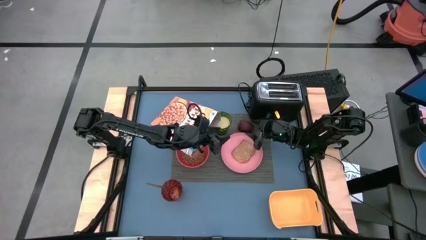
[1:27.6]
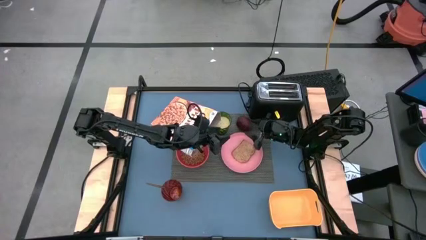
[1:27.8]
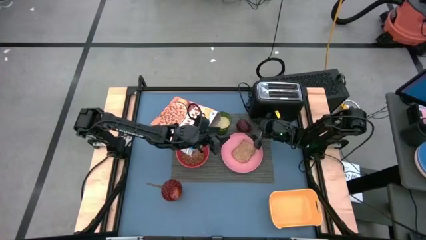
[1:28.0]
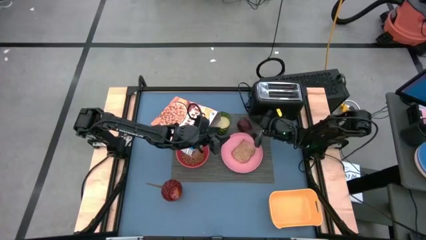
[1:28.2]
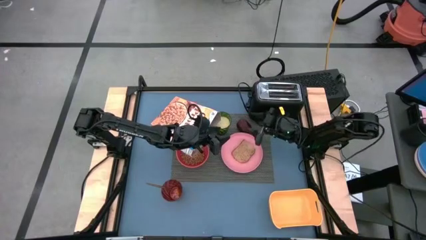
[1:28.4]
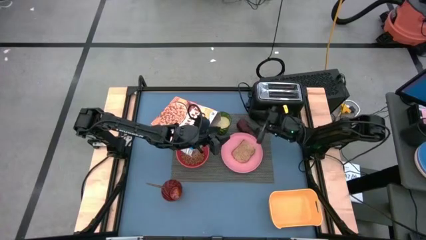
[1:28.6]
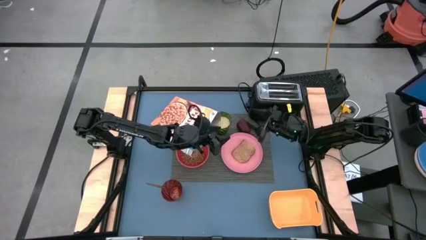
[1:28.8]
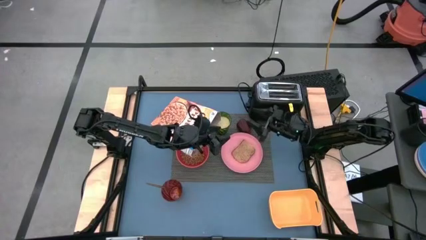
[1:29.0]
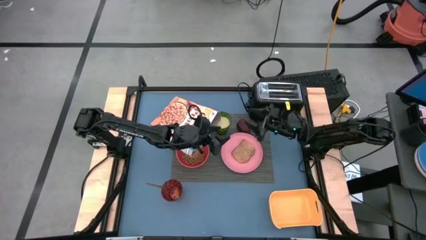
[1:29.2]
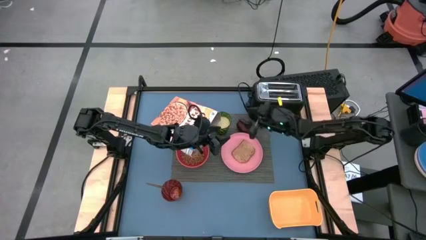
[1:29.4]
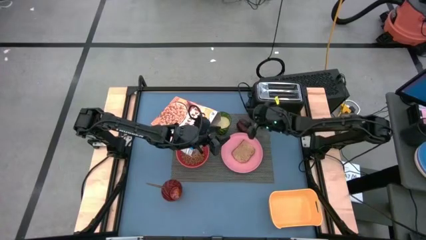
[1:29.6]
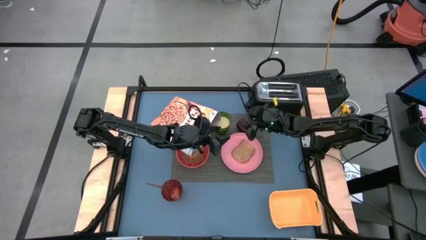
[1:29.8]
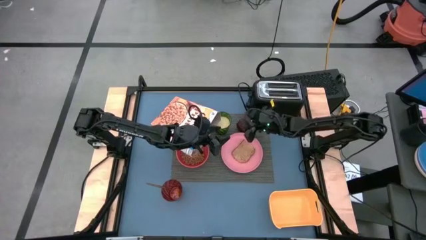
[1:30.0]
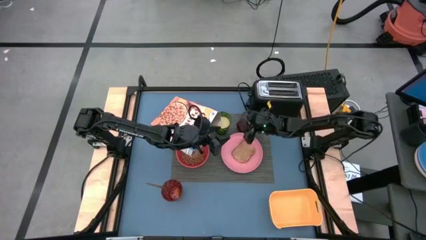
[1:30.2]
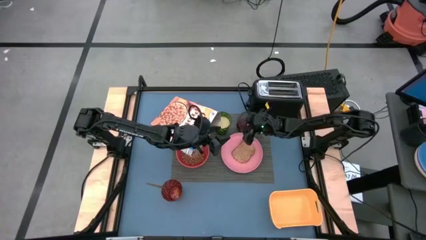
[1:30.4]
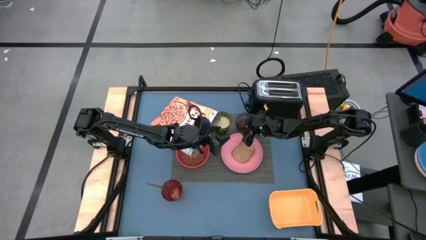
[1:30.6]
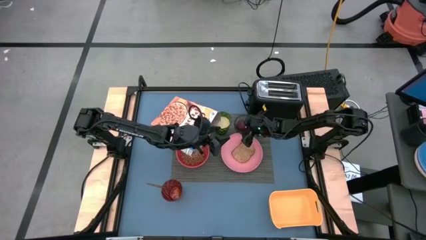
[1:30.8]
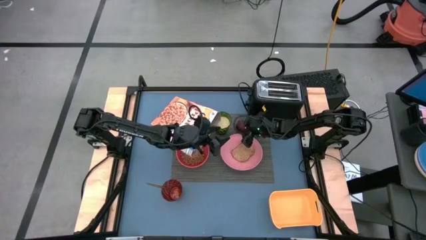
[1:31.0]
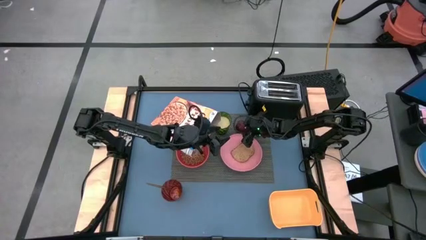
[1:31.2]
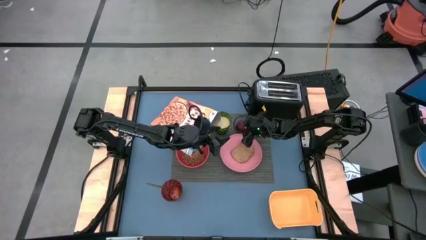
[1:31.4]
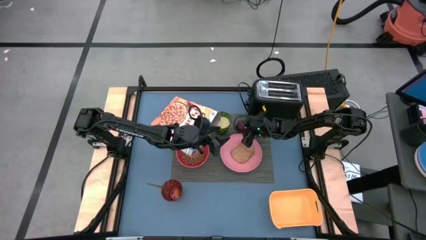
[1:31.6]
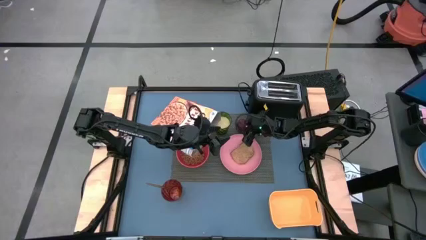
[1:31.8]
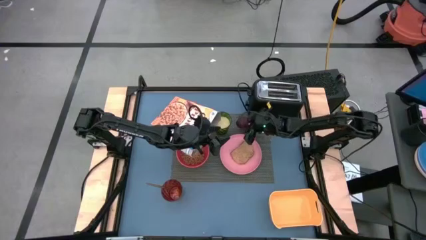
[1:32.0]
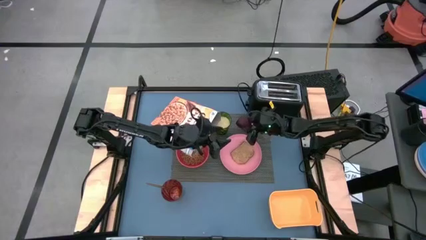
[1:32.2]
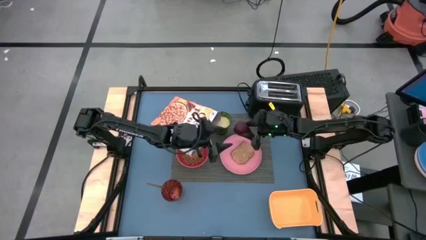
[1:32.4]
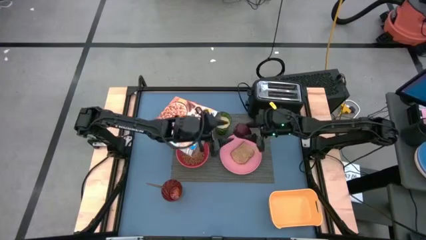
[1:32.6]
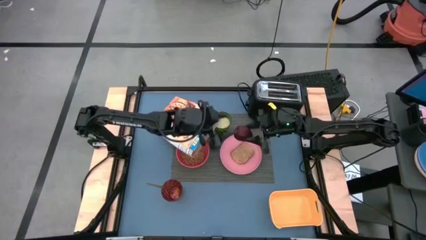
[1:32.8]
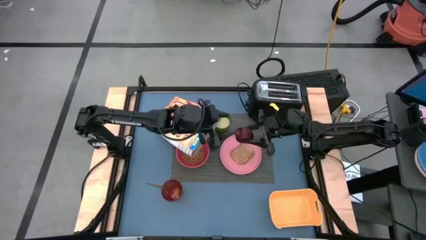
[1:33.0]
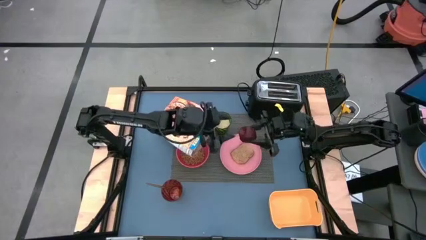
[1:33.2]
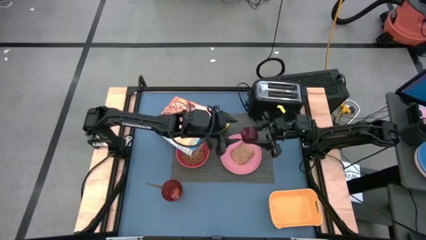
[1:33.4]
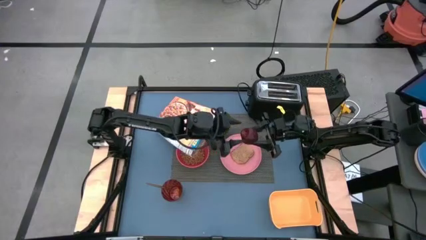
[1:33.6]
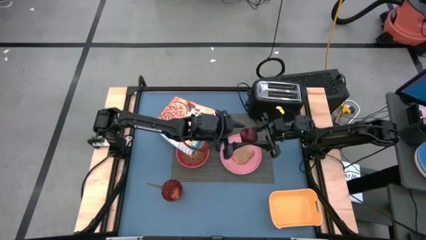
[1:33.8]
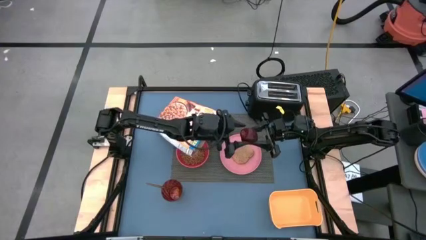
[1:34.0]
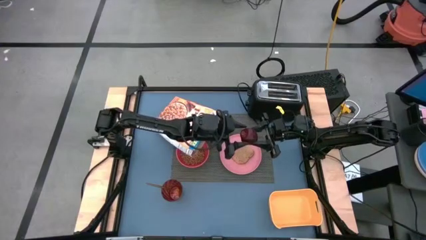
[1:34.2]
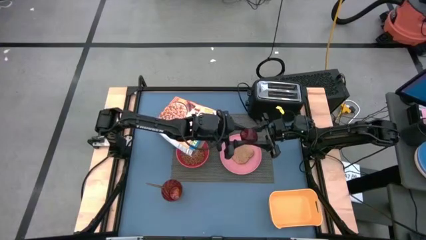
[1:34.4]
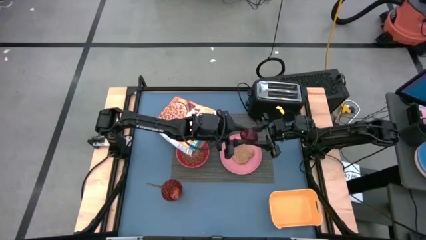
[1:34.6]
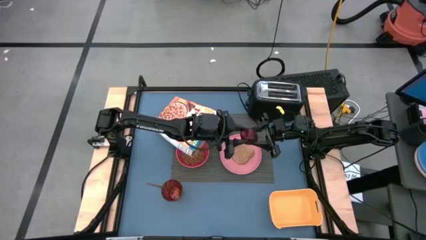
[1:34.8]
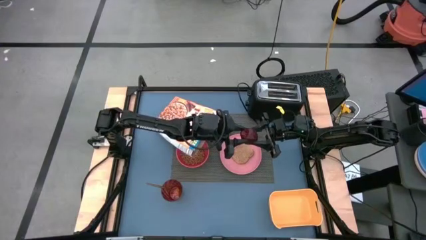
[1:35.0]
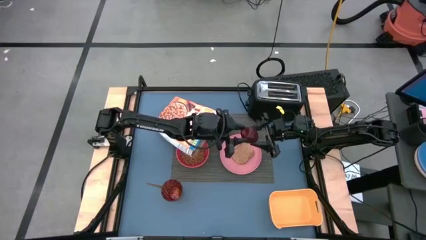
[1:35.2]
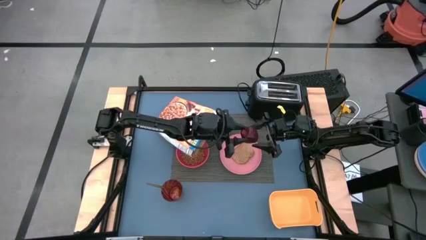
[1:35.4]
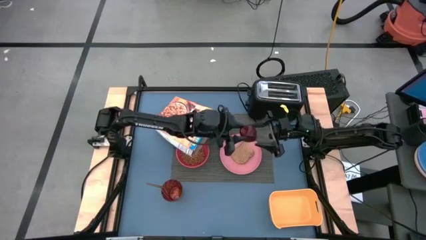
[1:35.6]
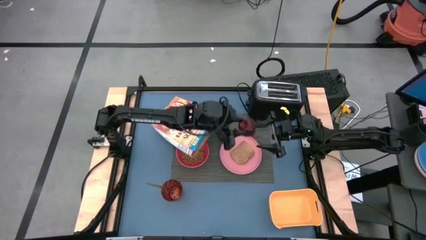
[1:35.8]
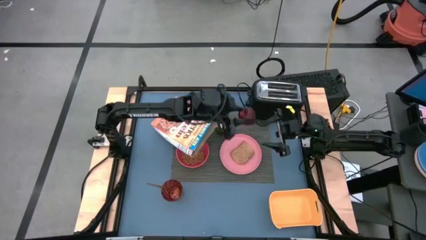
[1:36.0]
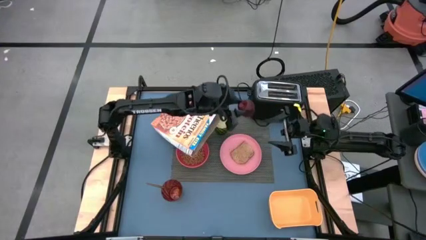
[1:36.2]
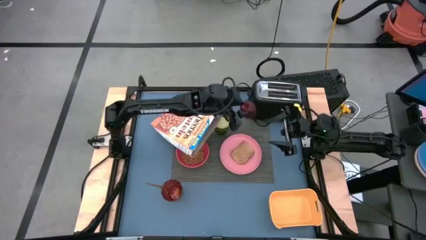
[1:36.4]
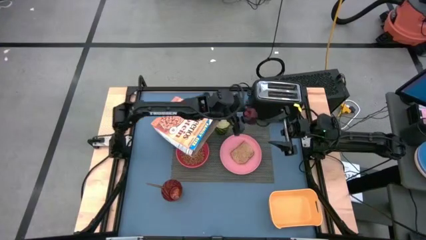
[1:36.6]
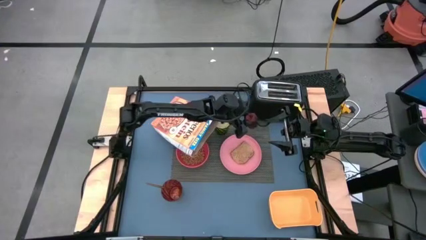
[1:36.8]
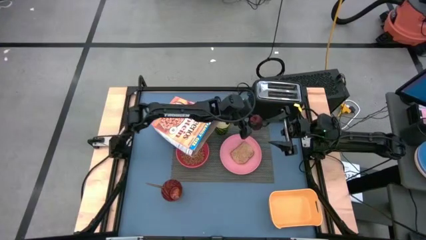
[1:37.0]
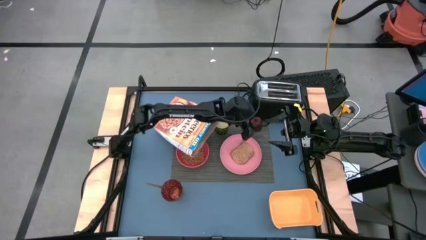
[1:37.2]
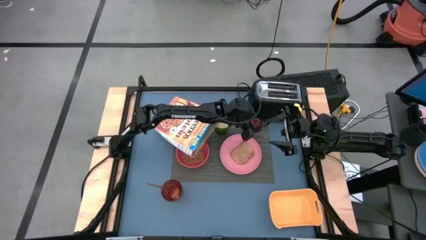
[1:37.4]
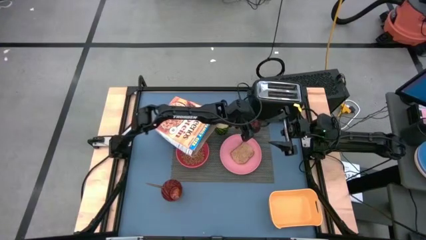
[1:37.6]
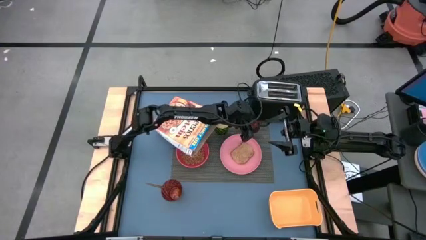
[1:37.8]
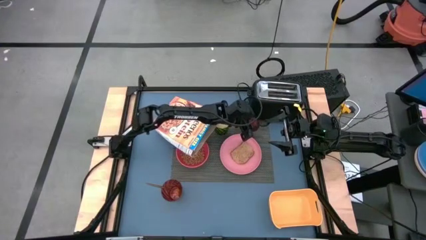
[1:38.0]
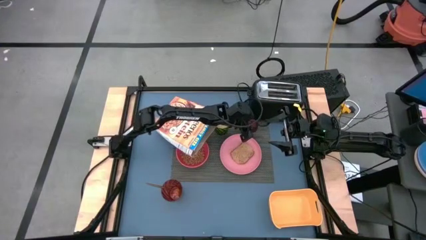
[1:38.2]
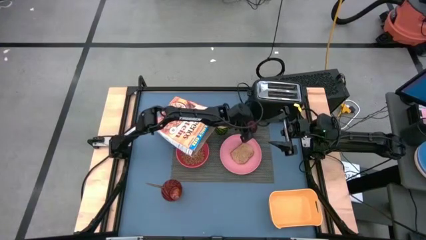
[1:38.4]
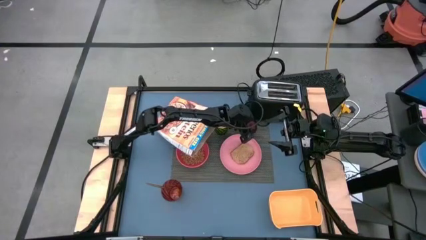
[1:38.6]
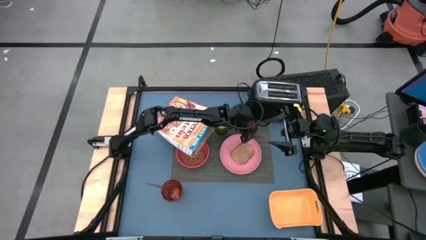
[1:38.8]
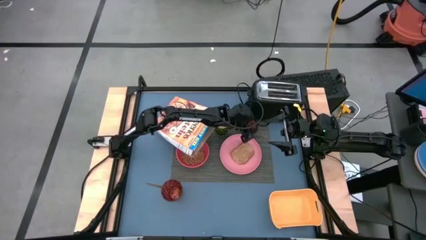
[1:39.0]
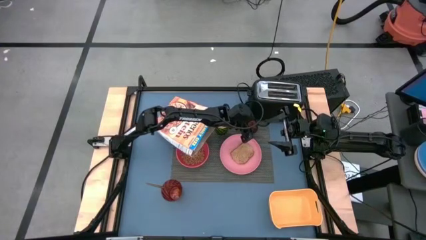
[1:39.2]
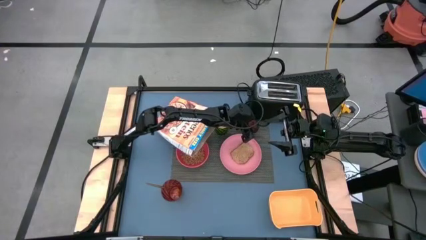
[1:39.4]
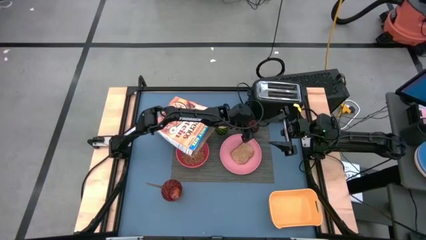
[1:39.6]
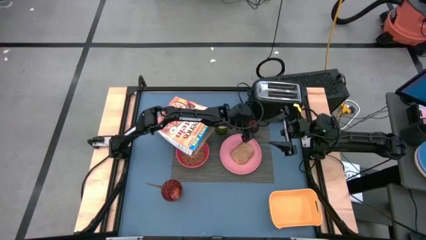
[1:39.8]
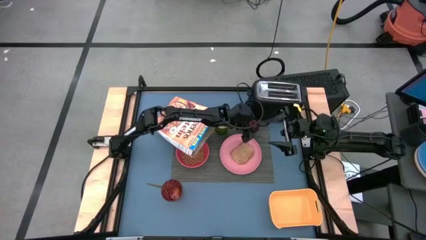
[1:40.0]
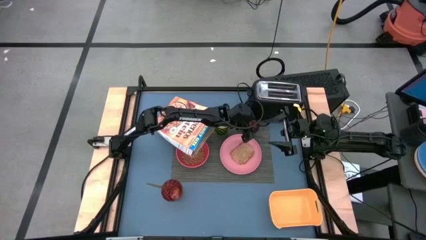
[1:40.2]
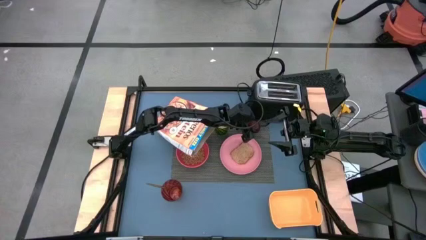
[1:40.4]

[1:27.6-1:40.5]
Task: Arrange a breakfast setting
Put the apple on the placemat above the pink plate
